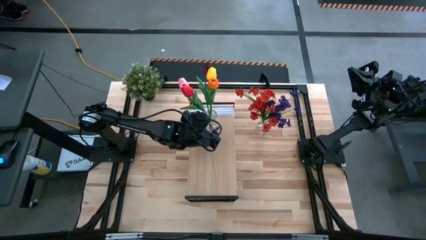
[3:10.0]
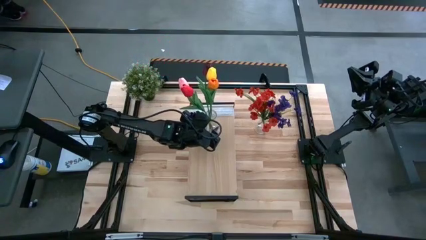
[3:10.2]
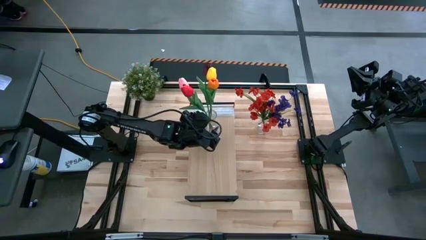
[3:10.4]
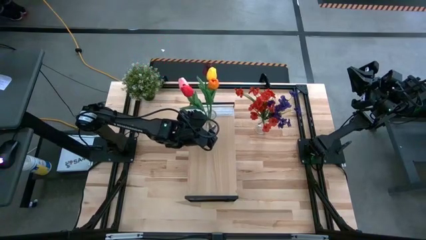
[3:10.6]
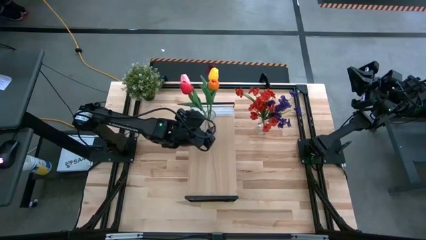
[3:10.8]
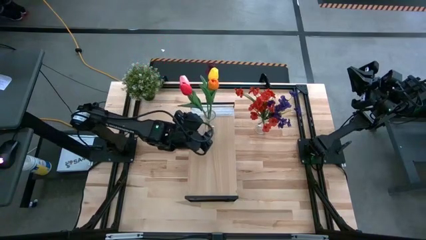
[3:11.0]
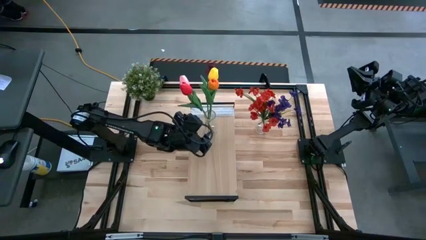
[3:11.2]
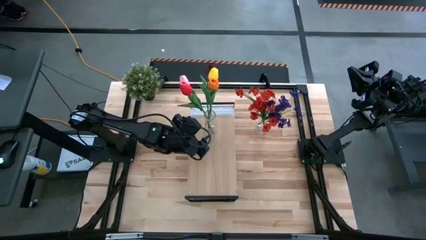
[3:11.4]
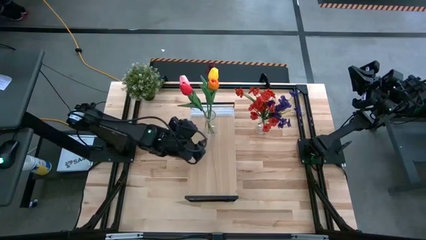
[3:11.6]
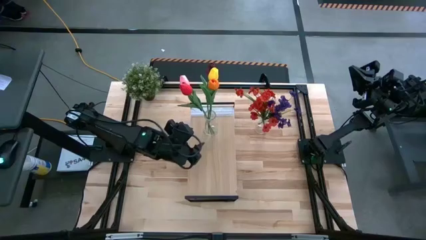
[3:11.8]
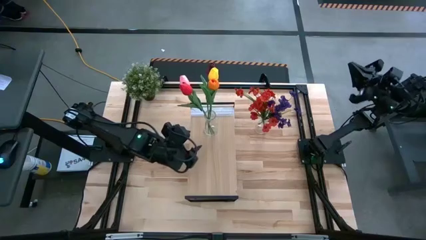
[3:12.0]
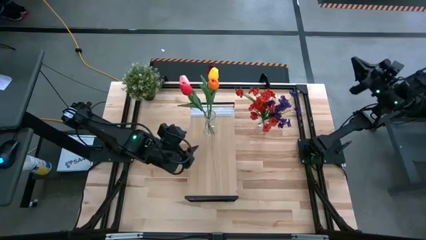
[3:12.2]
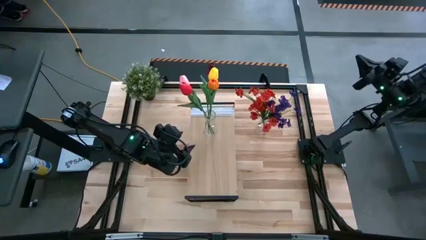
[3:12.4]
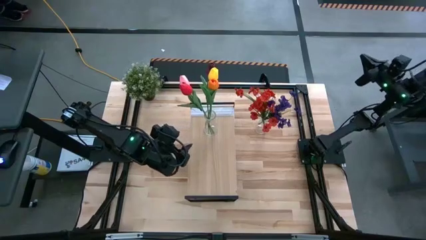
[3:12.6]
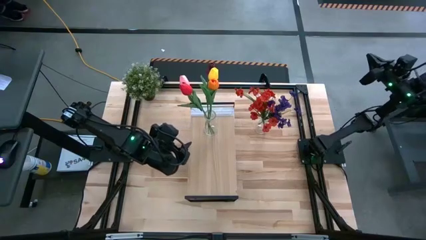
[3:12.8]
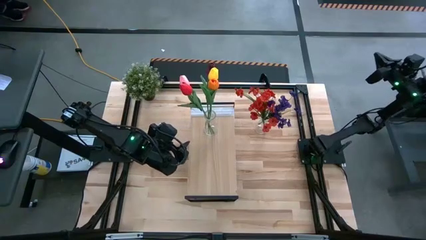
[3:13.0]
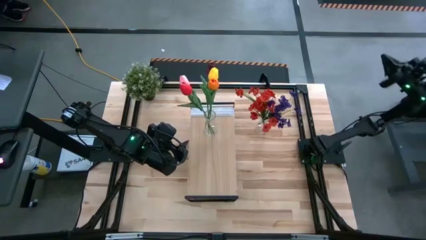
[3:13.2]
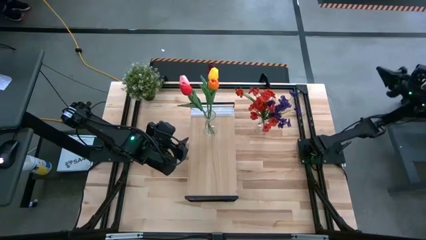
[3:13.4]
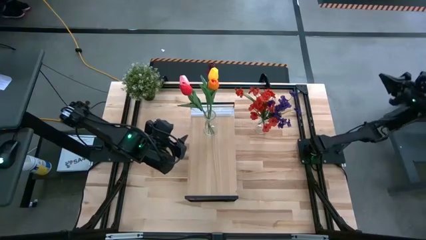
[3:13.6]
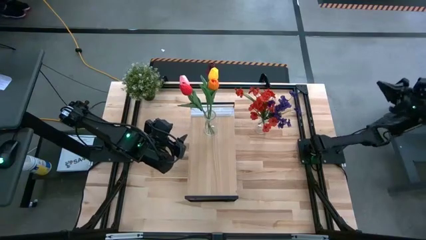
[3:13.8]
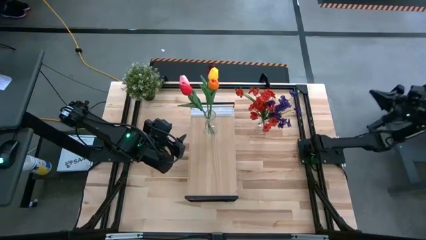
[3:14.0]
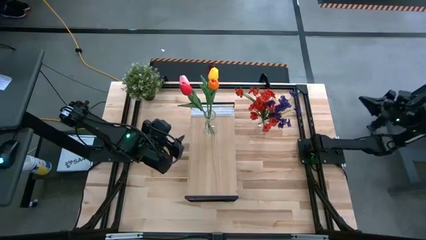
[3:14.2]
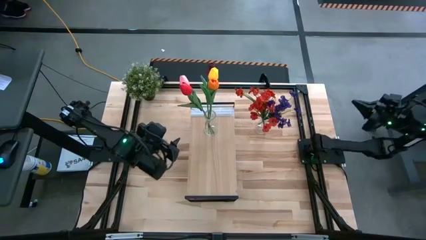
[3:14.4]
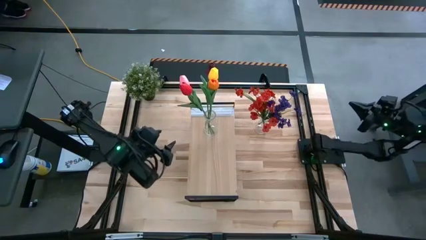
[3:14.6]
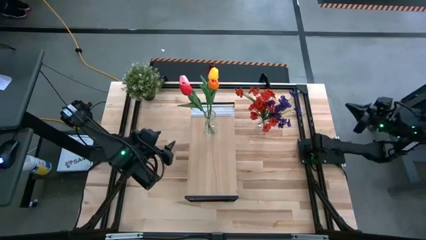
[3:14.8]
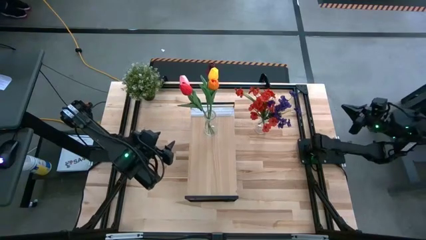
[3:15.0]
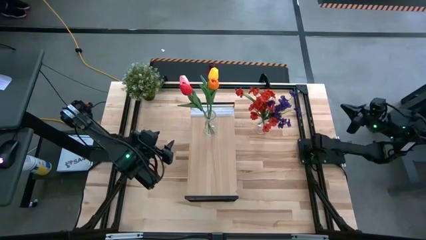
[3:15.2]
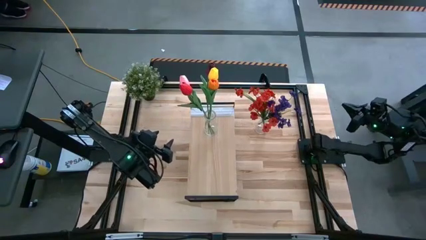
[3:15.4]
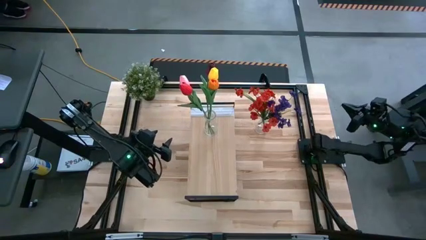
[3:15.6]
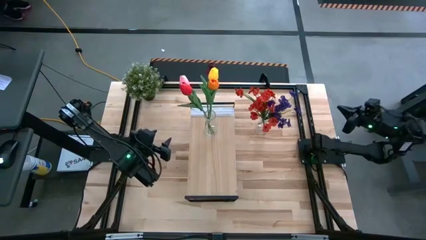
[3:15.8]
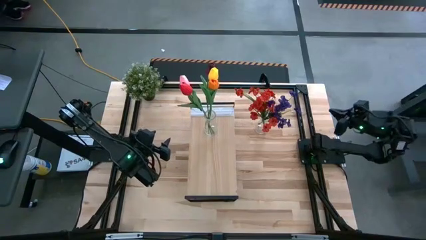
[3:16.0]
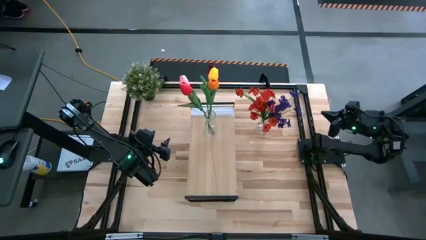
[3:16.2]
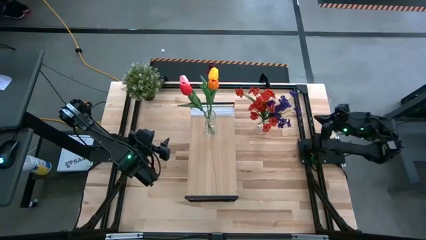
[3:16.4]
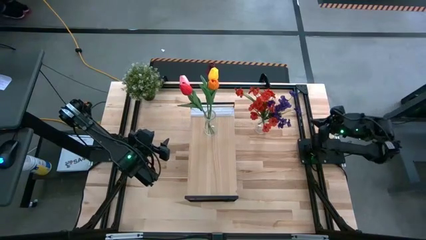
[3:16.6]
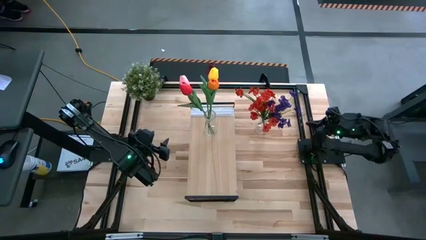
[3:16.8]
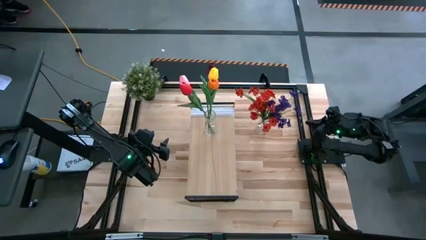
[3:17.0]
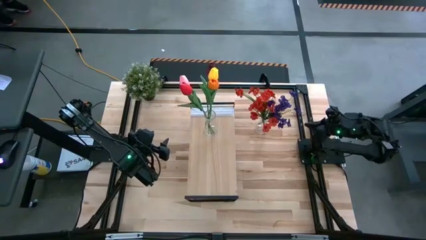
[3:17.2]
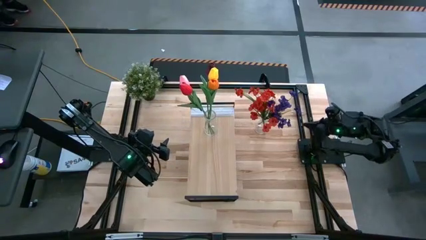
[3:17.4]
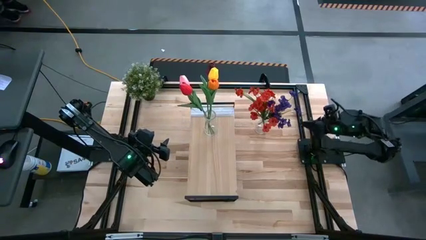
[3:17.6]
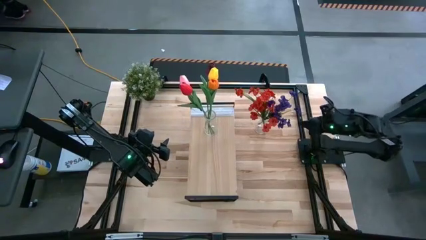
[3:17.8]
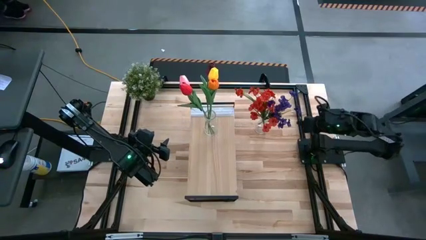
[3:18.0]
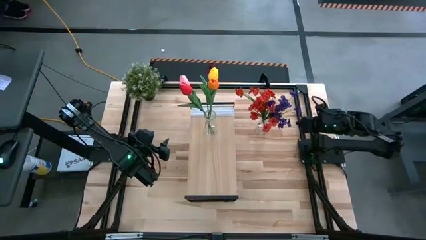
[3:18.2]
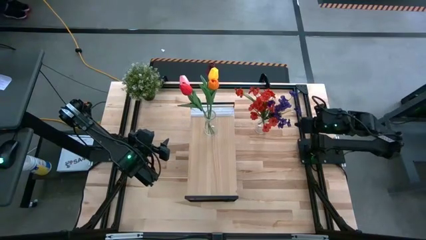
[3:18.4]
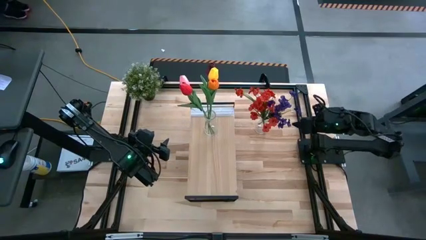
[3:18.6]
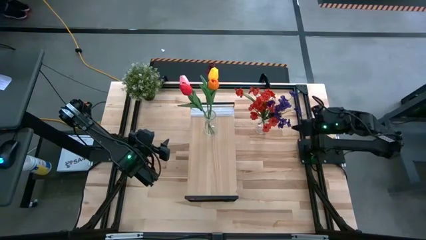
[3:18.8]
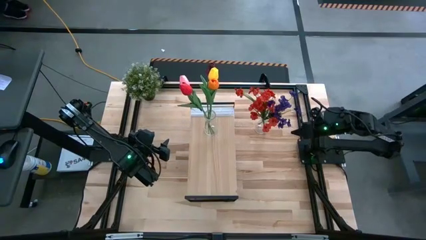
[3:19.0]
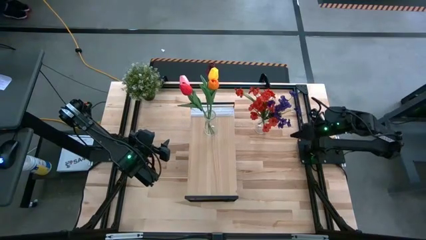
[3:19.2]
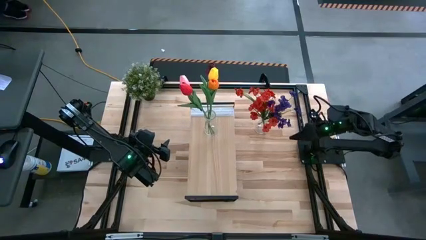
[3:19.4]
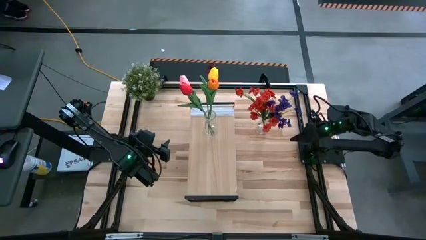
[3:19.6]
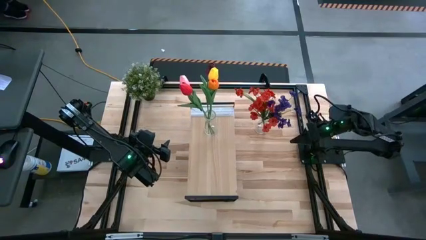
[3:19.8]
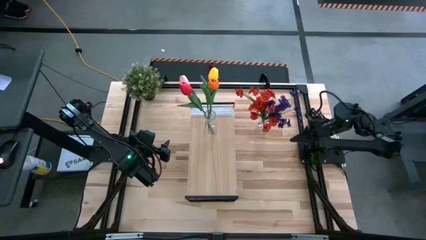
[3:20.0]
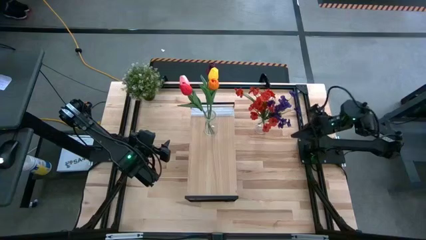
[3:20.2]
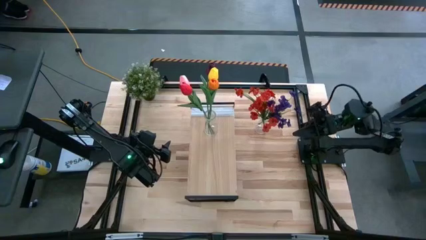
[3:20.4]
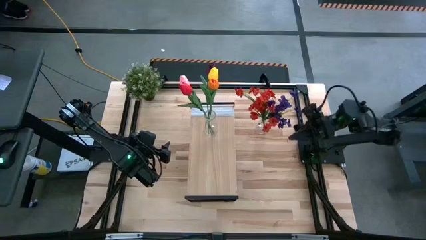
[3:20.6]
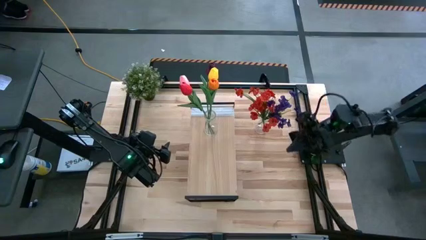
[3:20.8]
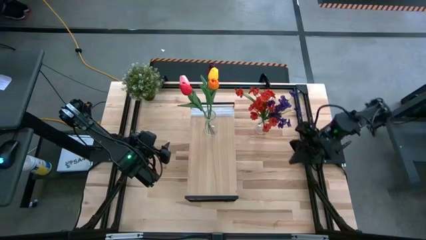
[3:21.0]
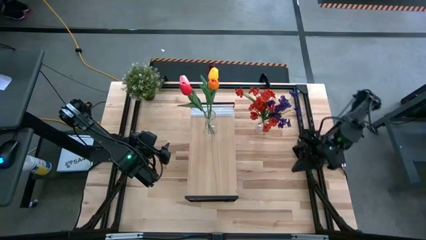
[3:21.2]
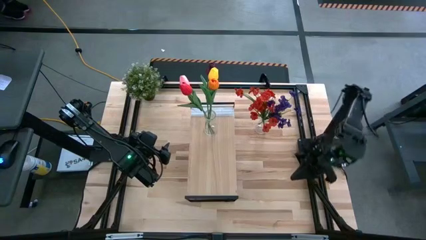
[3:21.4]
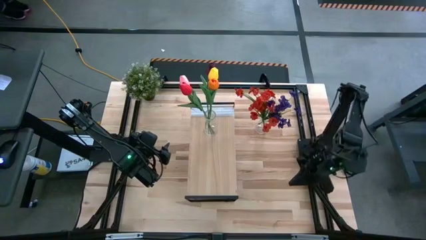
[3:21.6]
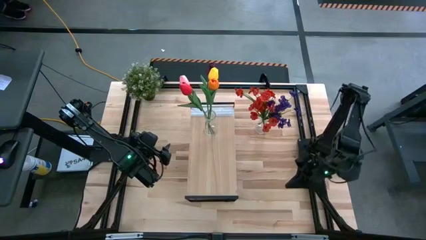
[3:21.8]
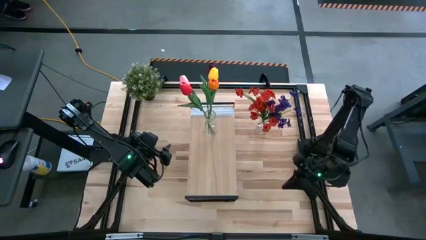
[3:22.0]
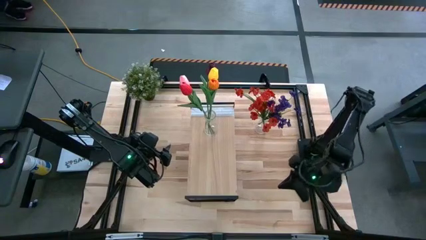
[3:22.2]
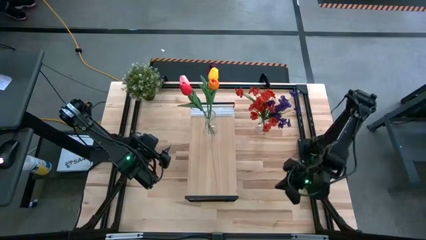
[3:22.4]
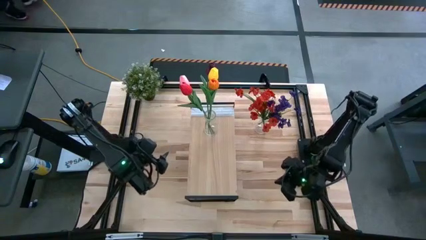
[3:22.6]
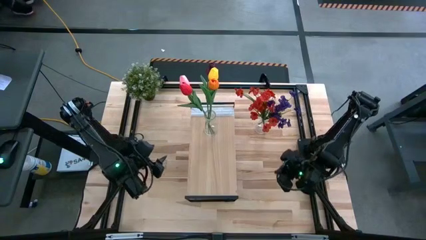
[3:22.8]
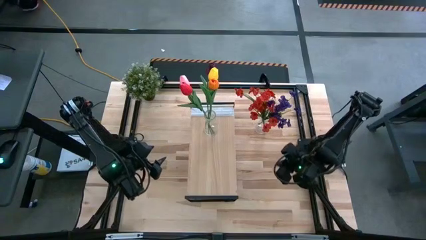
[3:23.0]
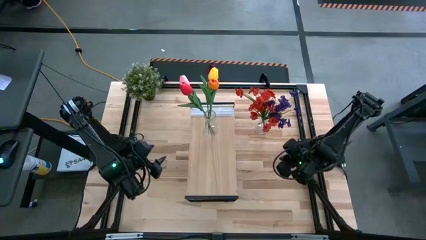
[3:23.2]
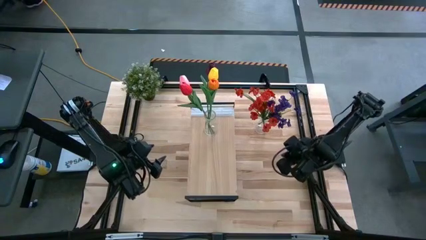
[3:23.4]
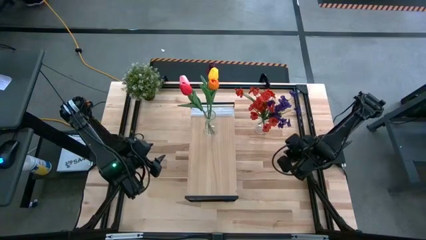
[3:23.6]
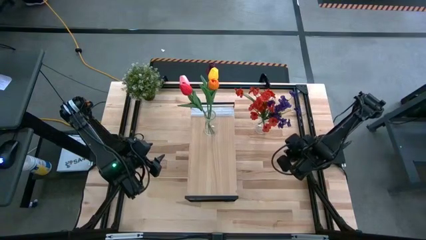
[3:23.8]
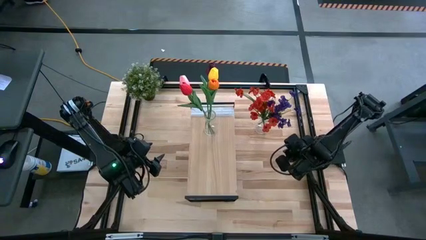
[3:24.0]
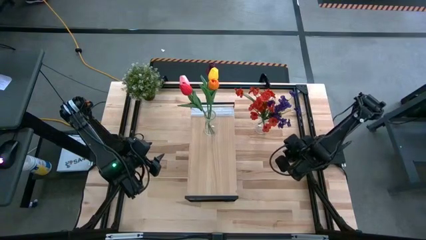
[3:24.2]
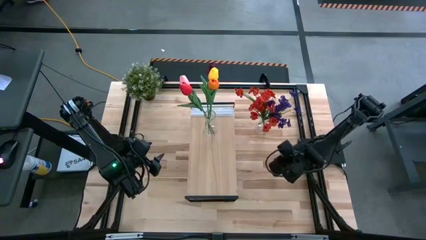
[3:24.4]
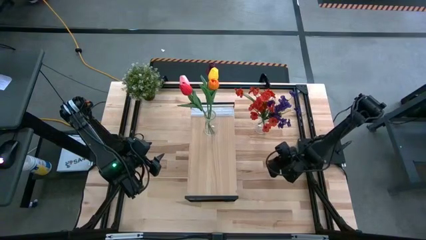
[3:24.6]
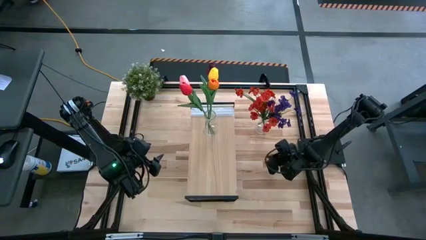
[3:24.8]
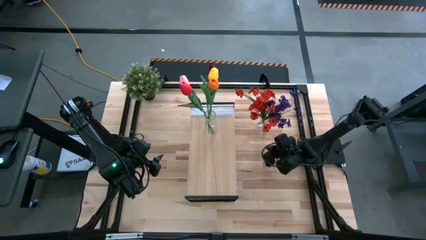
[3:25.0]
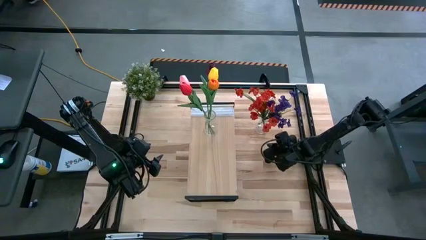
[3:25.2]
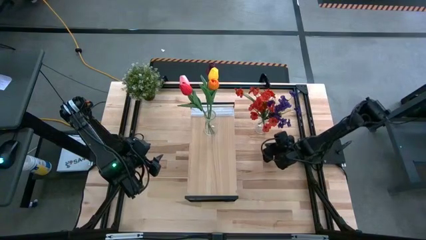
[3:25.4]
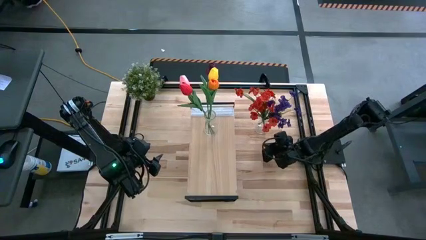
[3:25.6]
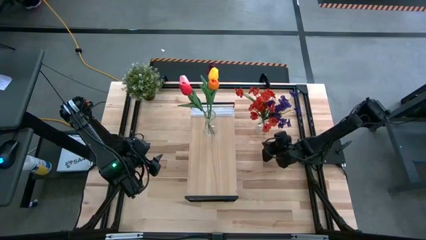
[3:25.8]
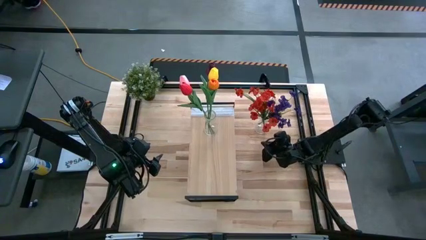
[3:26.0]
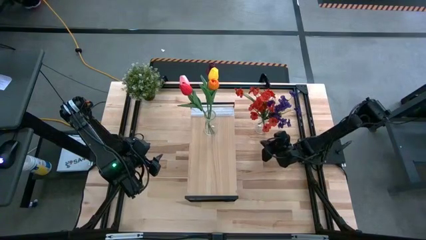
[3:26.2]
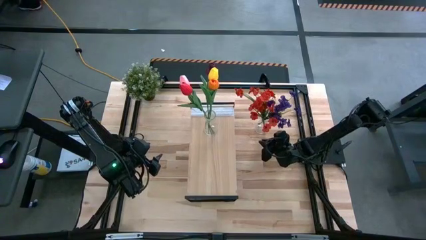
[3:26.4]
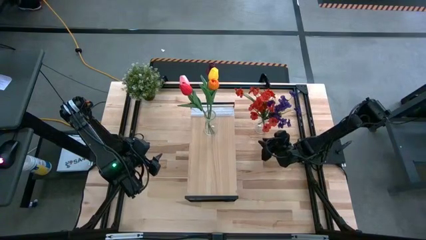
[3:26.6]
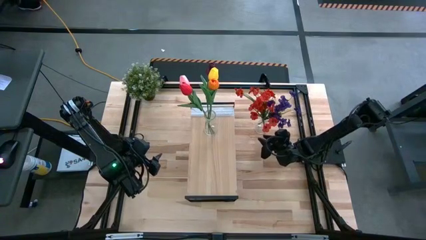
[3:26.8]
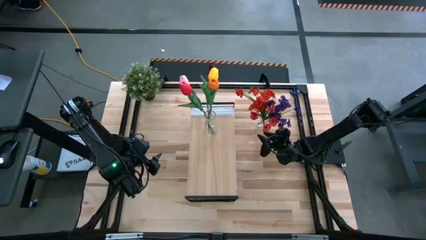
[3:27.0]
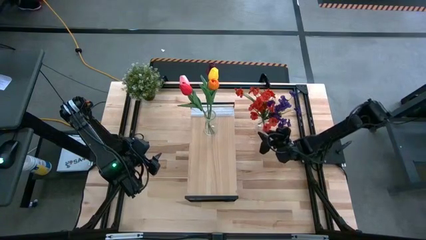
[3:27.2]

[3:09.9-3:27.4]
Task: Pick and place flowers into a vace then onto a shelf
Put the transparent vase with flowers on the shelf
